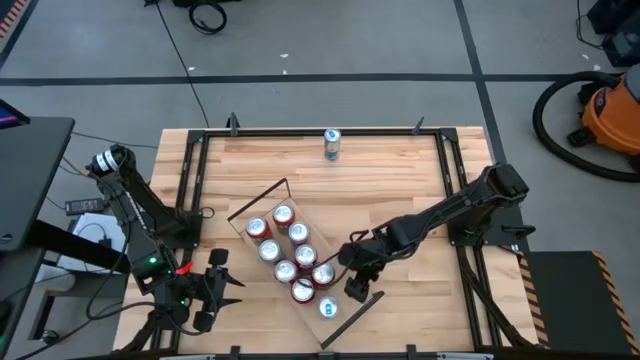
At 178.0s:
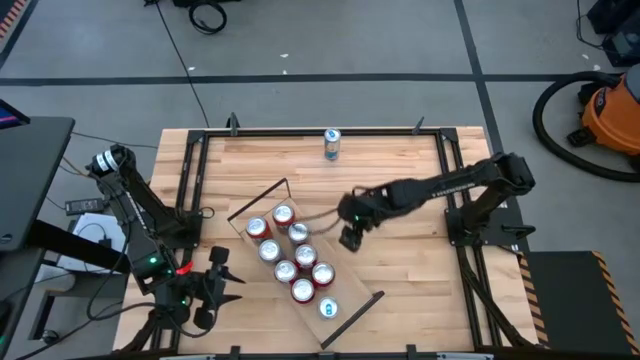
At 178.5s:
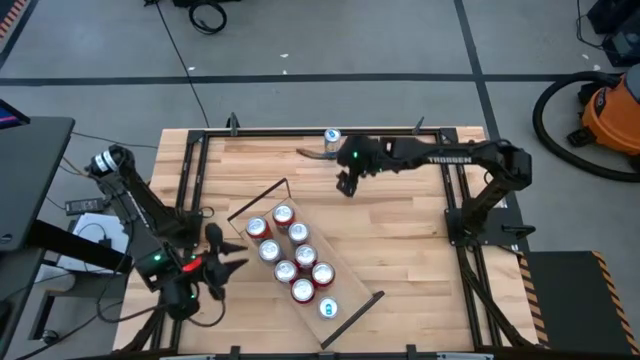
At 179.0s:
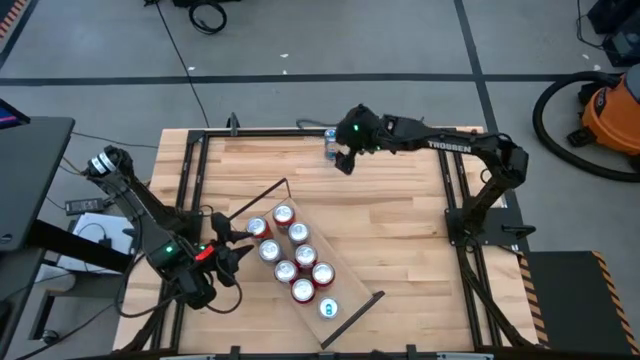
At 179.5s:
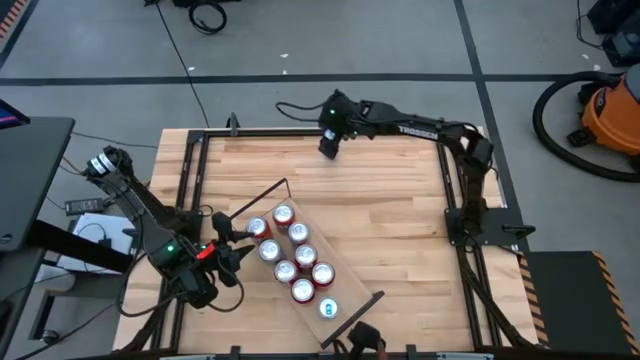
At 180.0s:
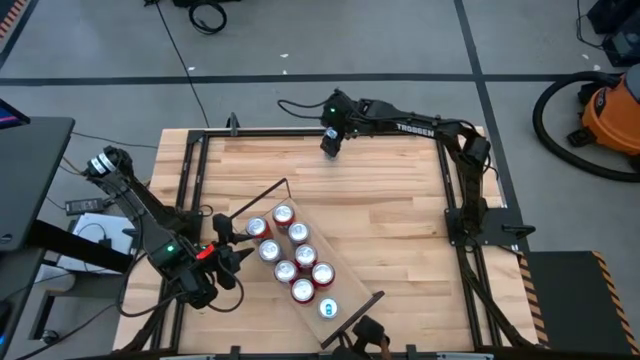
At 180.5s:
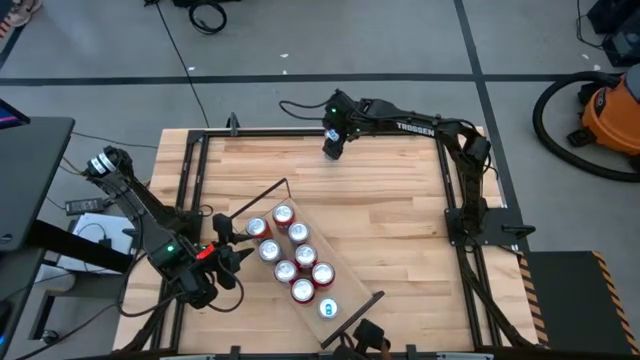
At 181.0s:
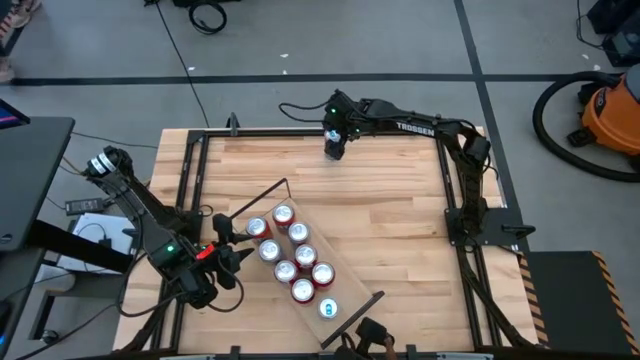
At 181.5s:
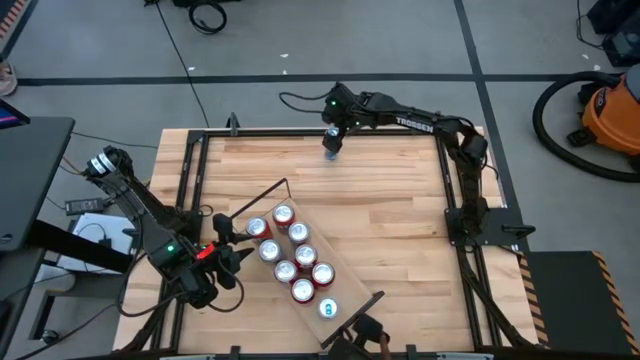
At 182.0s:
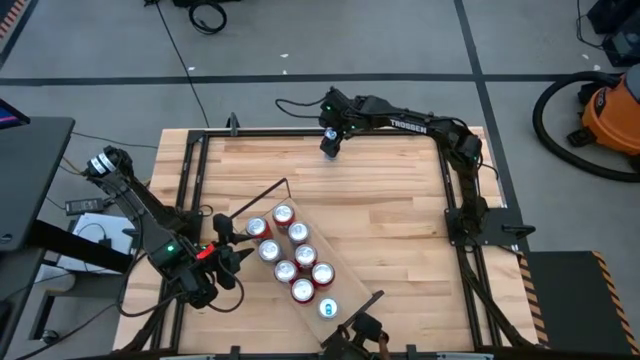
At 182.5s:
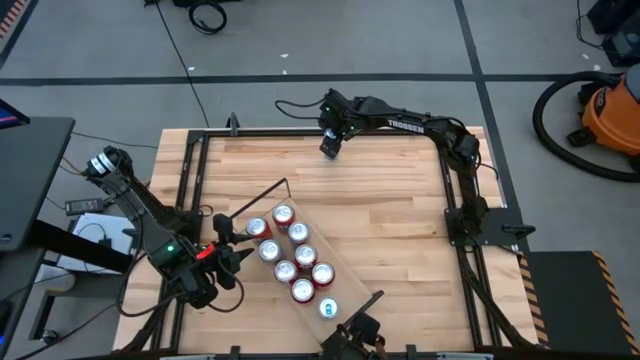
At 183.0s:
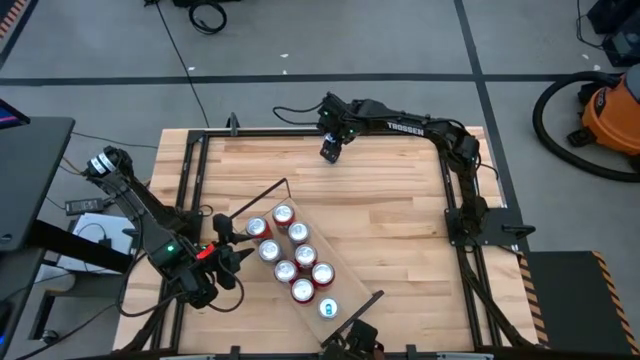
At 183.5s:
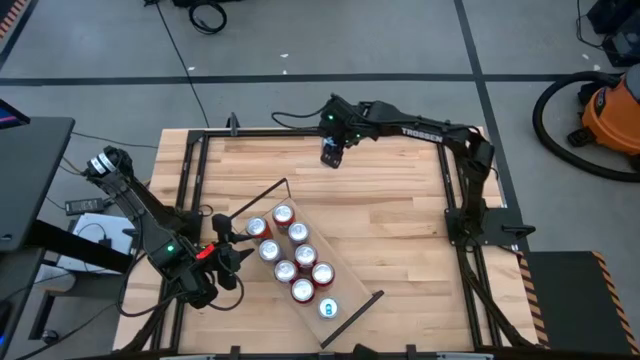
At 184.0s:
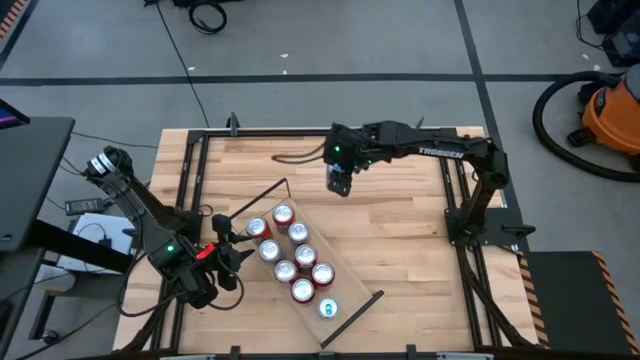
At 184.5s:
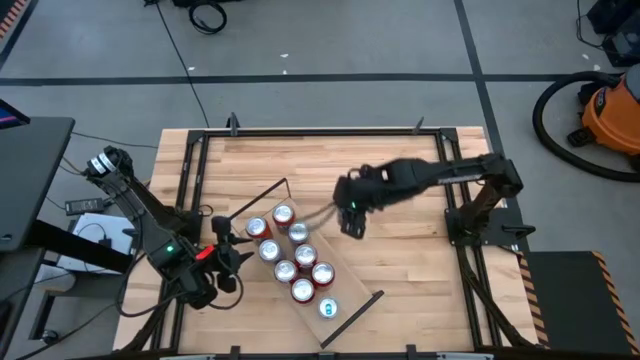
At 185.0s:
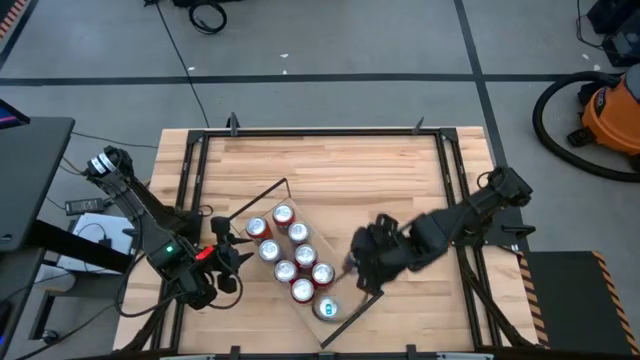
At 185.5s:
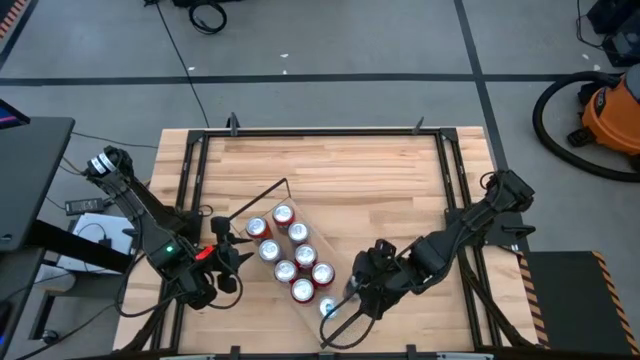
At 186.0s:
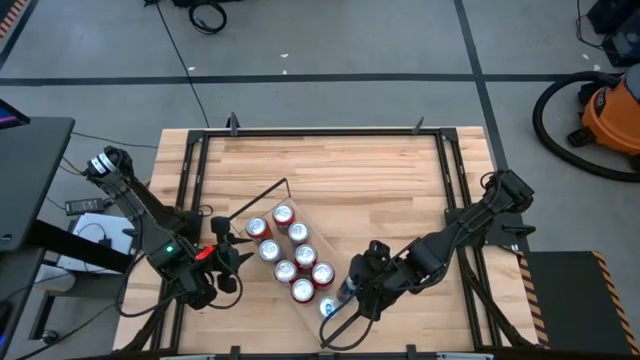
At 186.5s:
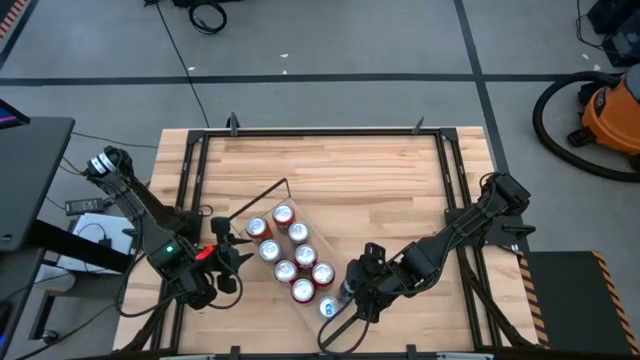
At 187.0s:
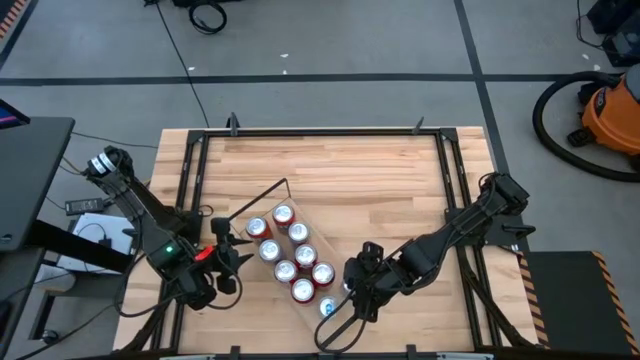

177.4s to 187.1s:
Task: Place canned beverage on shelf
Put the silver soda can on the shelf aligned with the other silver soda can

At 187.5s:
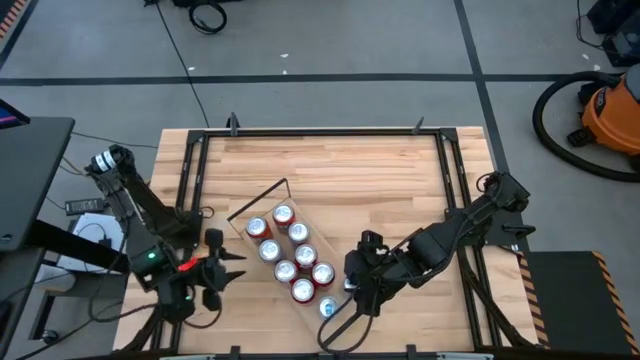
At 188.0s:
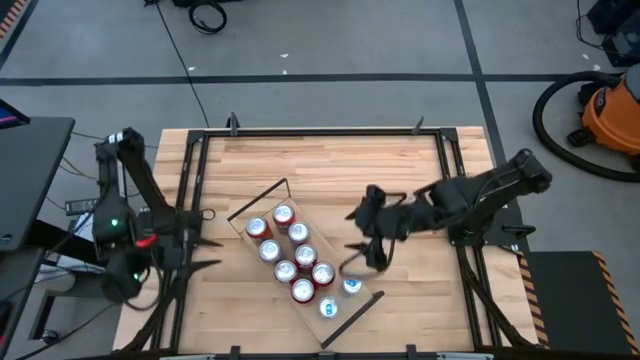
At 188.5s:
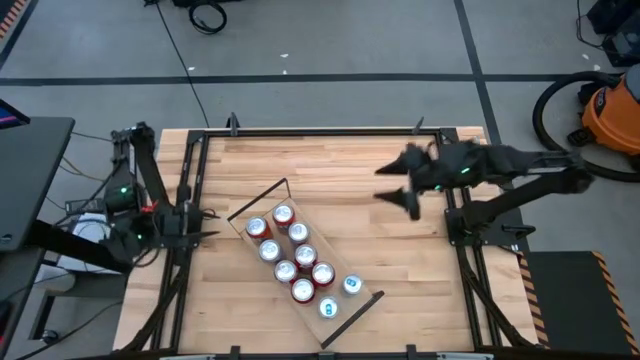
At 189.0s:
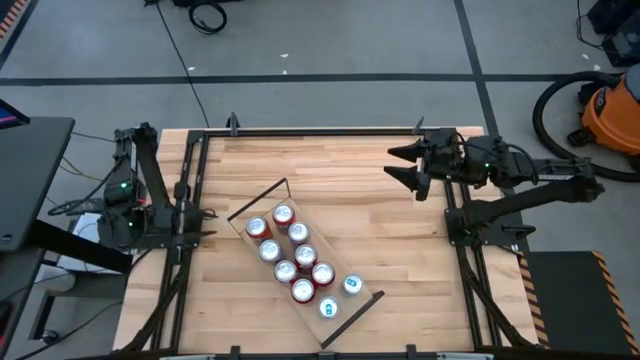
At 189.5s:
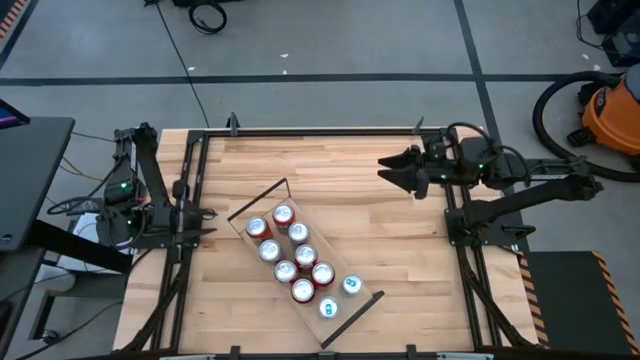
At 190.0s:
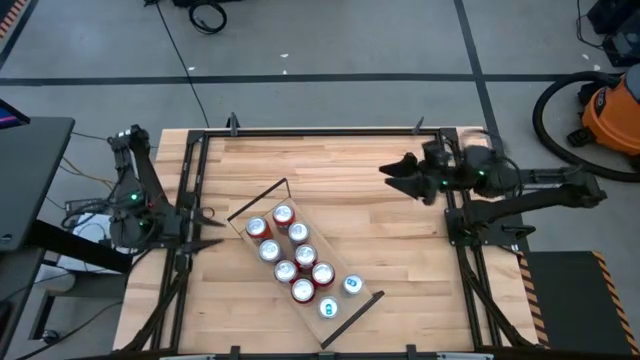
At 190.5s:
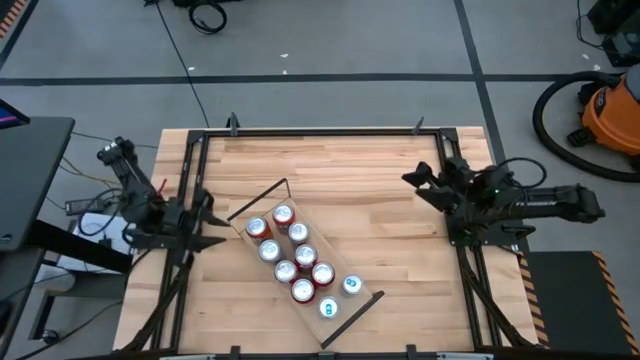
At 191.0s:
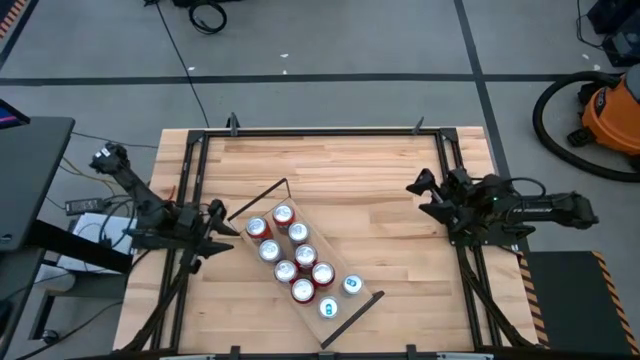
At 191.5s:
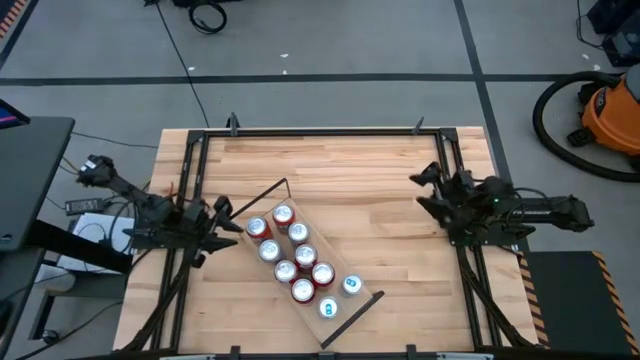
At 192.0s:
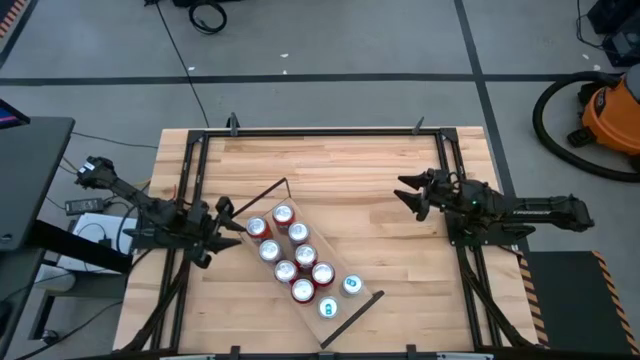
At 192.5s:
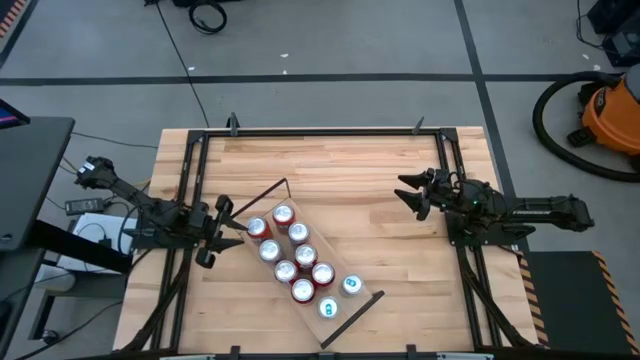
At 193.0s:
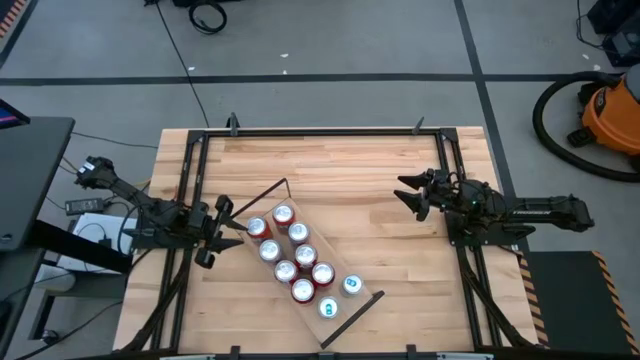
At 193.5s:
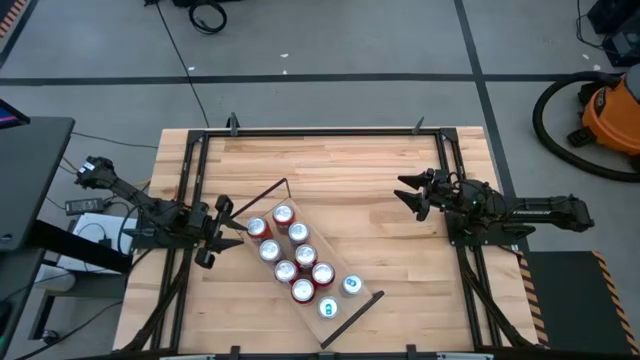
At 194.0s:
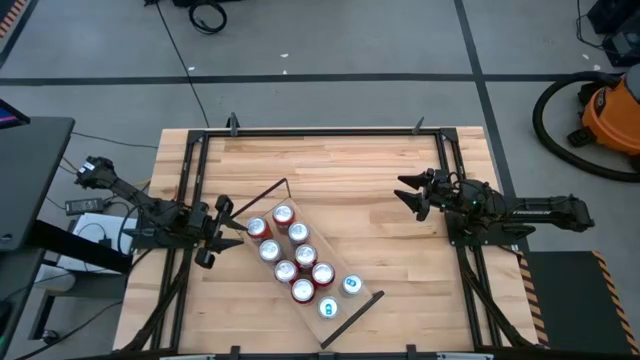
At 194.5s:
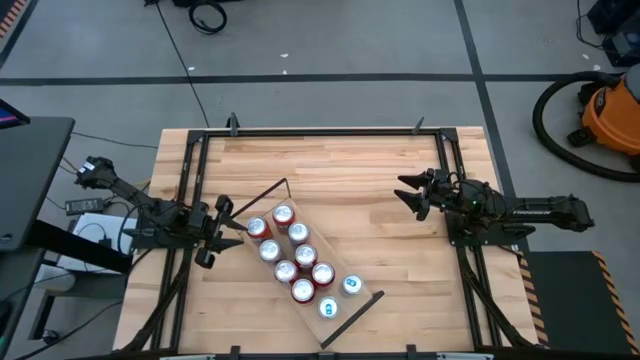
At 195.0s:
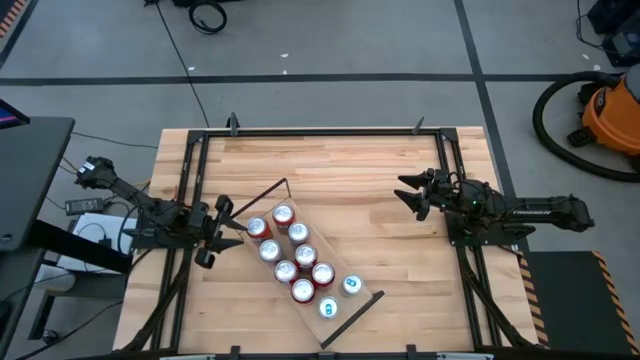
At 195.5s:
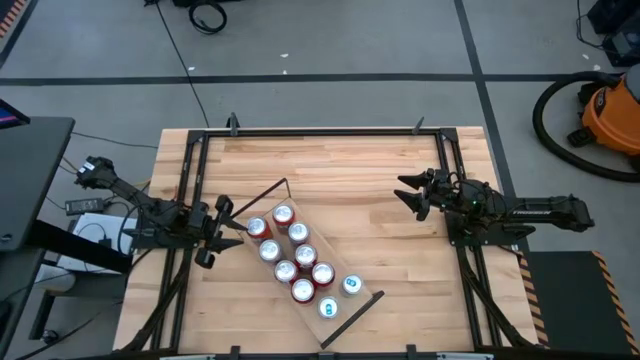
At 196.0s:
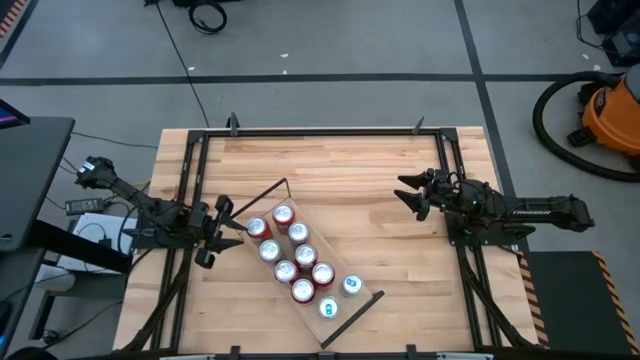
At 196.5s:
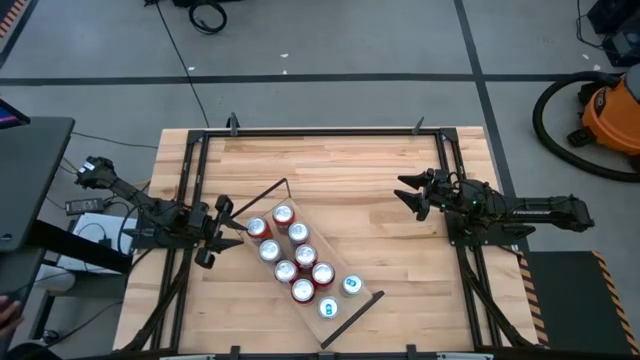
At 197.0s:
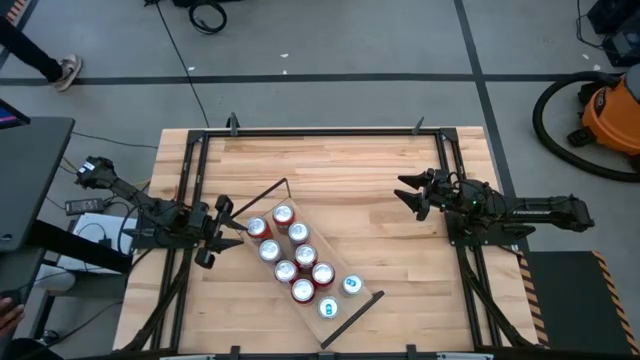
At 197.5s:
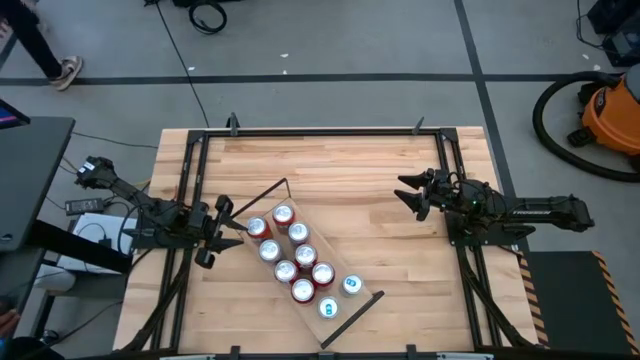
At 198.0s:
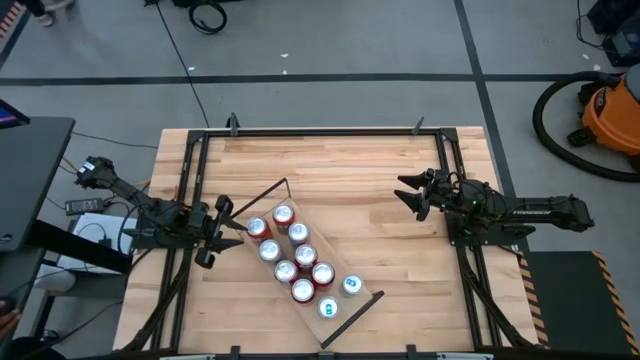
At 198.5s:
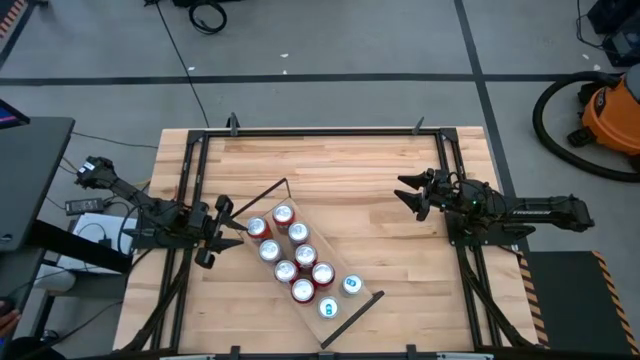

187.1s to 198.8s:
Return to Home Position
